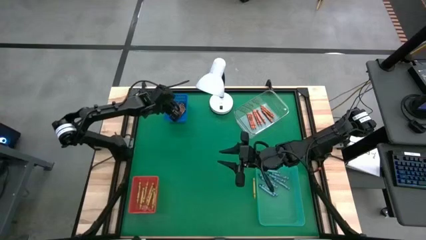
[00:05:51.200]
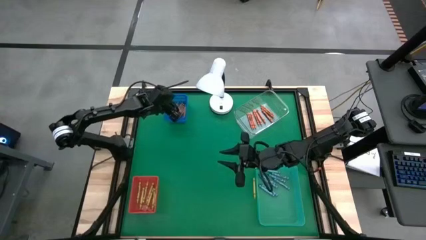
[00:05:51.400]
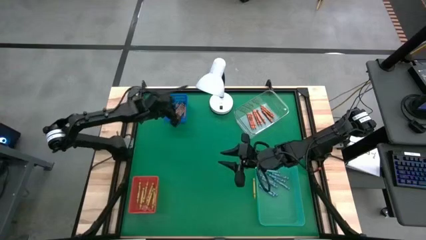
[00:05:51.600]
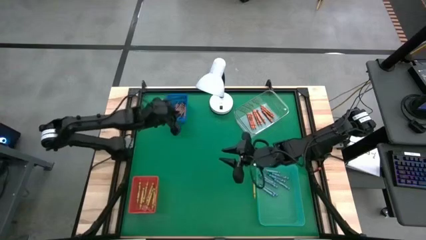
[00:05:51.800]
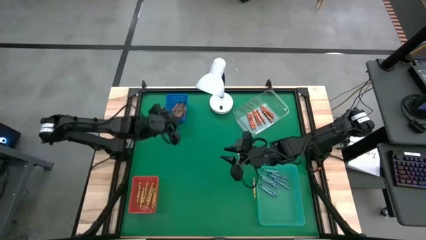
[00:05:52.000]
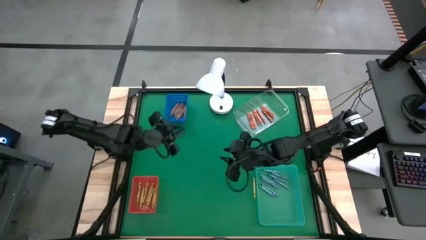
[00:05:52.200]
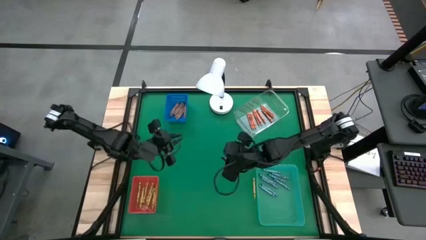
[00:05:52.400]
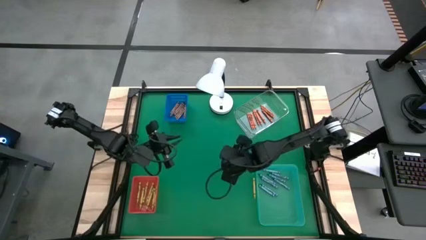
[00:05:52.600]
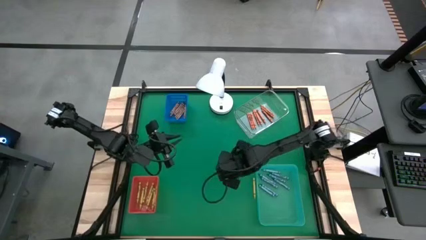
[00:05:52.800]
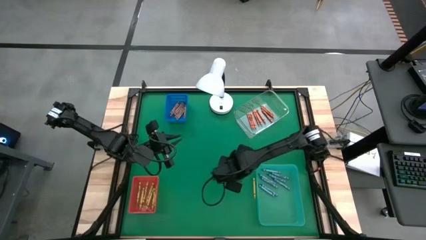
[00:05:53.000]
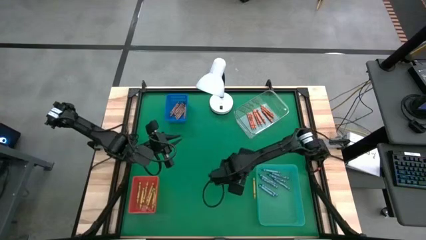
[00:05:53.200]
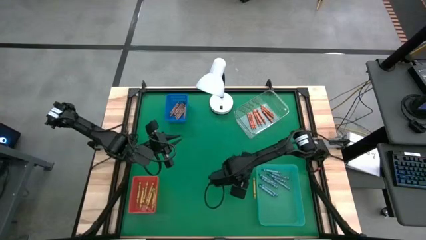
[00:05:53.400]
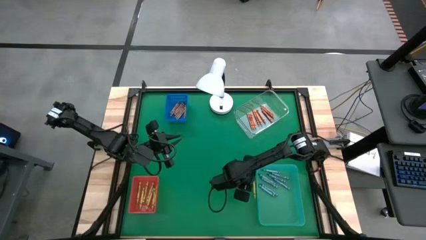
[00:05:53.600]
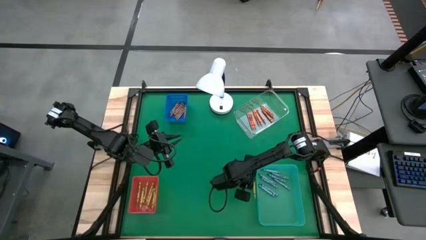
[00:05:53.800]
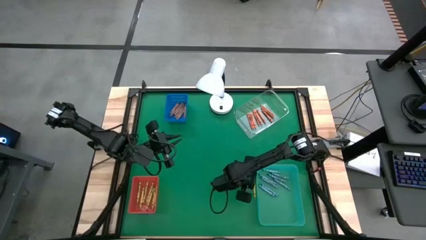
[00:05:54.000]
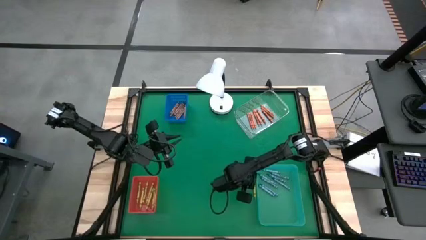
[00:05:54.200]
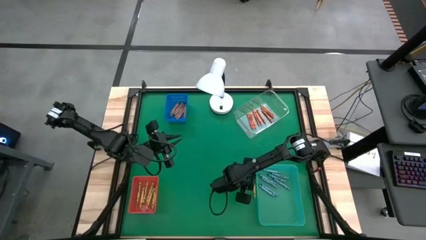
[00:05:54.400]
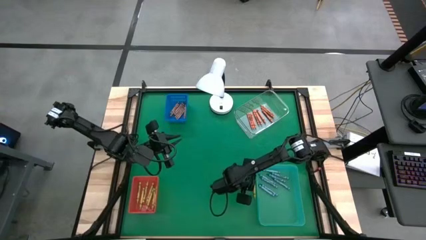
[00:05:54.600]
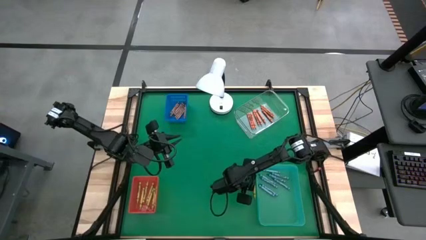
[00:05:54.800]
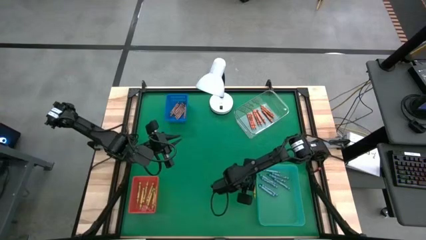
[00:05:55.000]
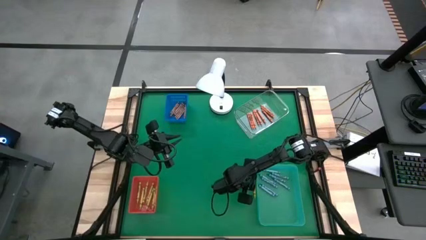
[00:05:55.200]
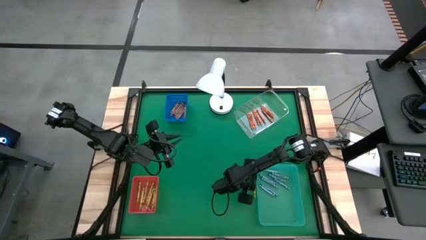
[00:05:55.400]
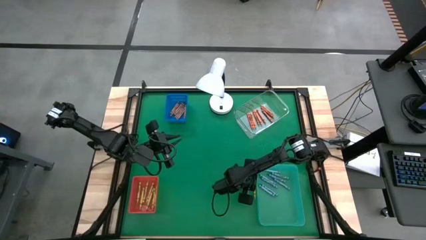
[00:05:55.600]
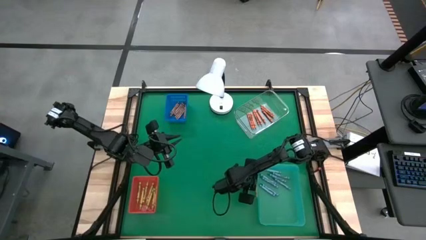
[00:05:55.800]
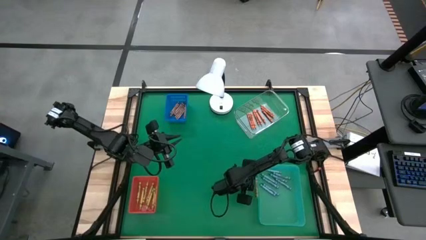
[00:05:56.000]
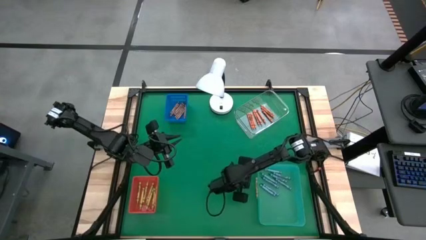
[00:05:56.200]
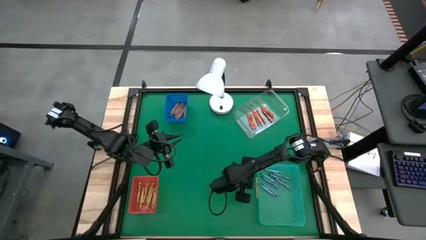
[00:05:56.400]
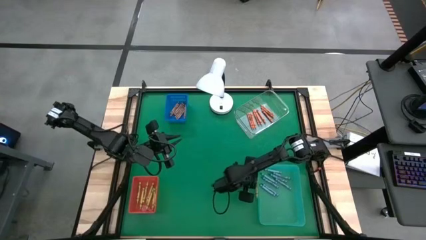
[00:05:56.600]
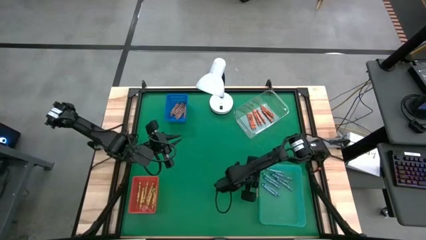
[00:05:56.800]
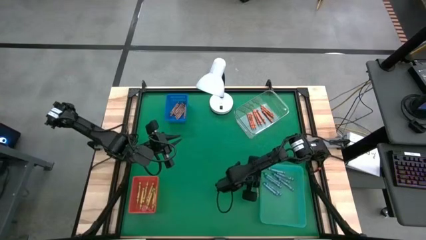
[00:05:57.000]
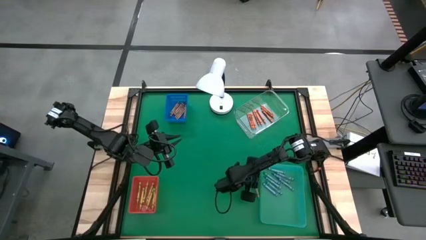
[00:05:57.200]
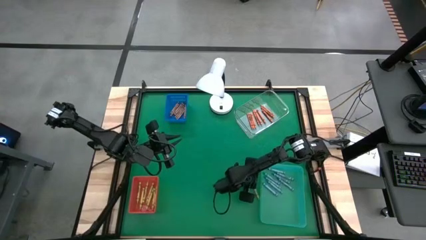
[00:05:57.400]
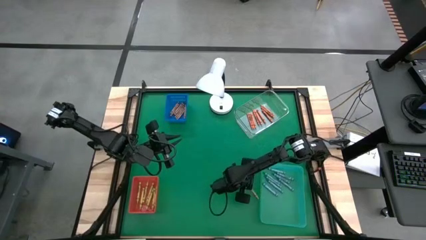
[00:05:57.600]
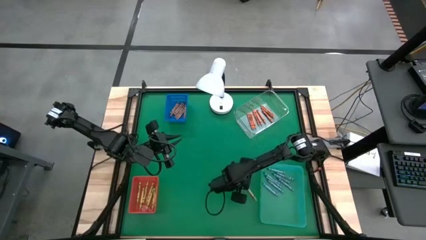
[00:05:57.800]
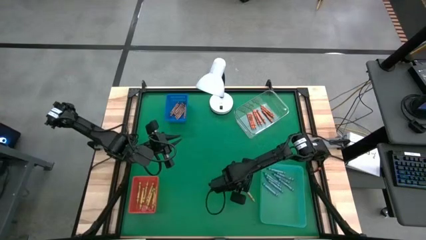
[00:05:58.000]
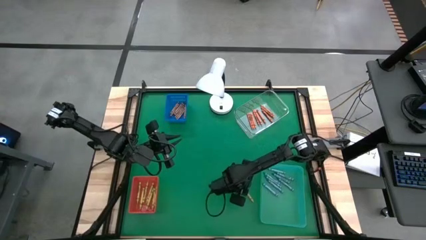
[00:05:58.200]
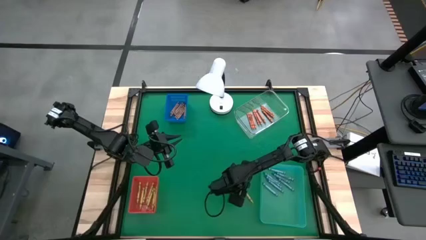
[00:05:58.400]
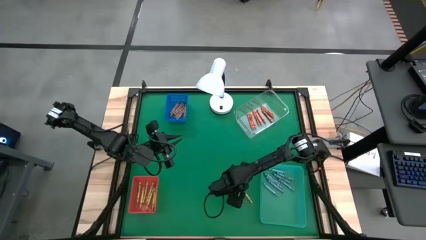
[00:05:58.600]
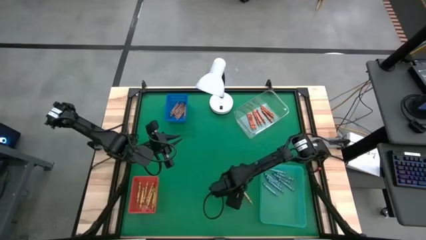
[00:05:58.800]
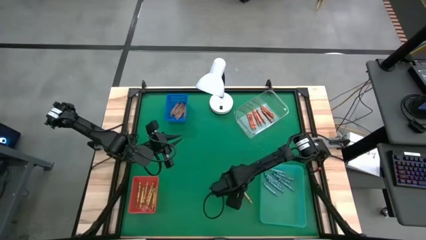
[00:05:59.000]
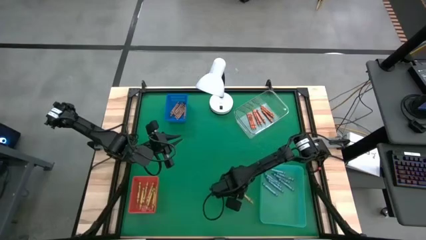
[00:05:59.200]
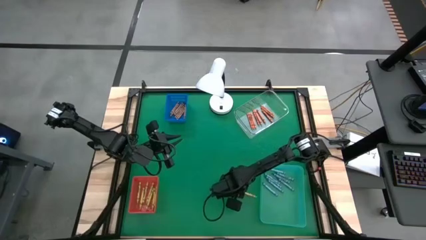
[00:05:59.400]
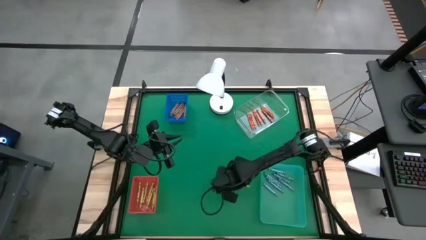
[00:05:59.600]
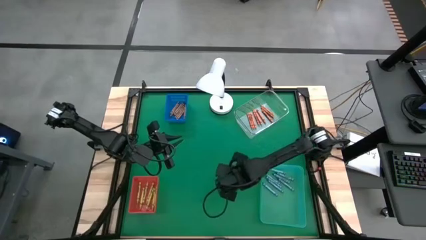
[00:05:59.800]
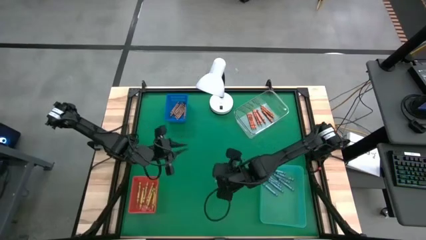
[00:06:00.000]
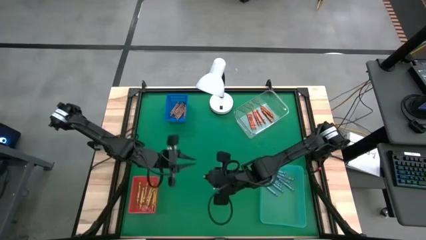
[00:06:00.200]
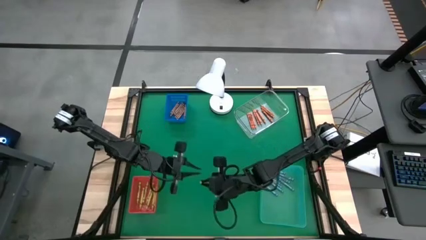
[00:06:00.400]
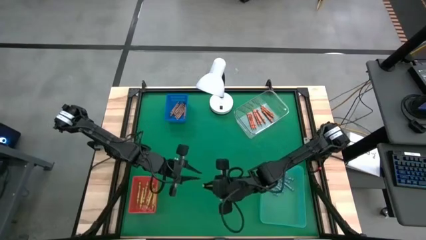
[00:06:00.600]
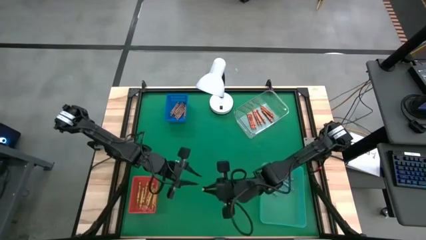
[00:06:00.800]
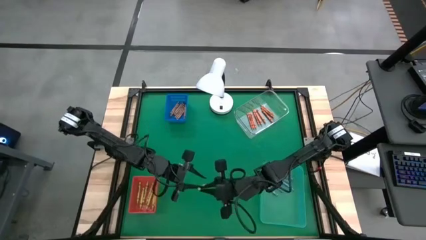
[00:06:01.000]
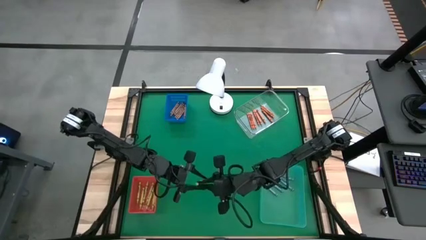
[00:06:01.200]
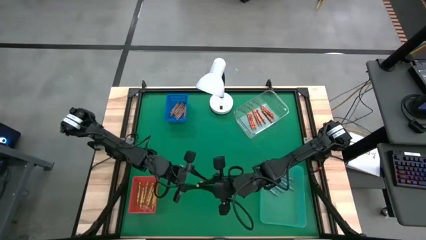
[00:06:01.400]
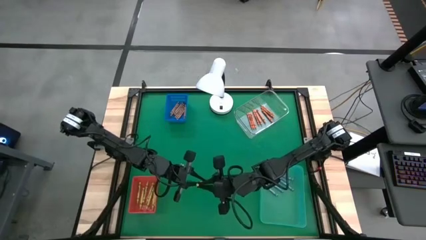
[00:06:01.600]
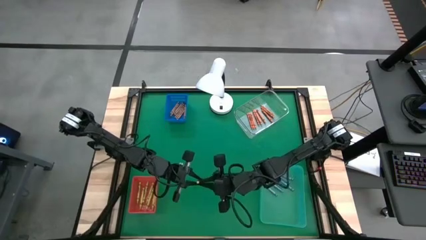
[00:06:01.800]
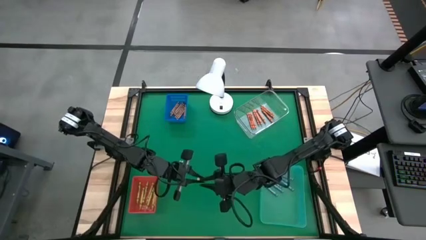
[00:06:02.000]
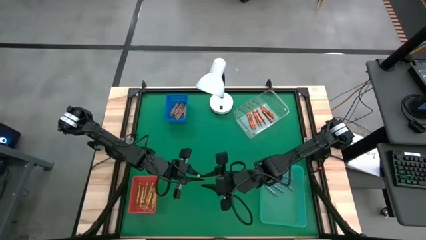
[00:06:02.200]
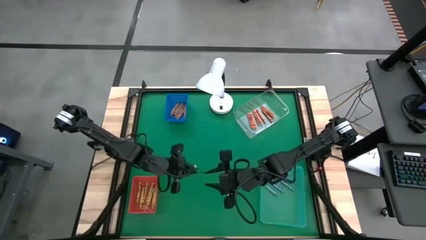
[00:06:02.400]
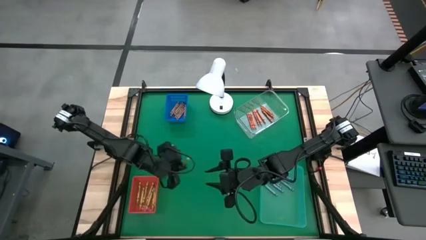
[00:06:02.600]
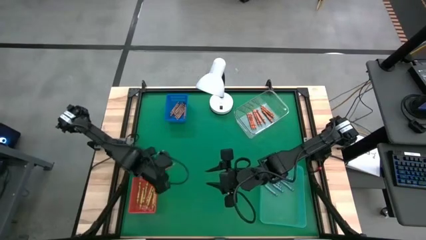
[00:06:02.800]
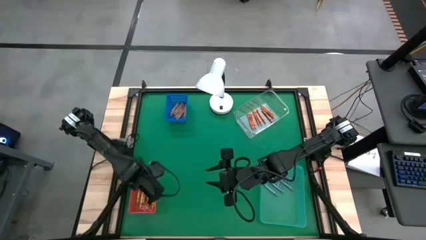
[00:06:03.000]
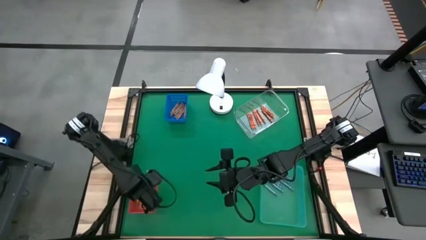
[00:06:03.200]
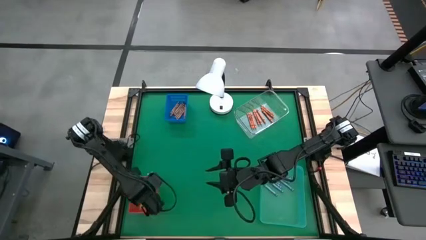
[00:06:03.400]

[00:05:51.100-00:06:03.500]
Task: Sort crayons
Put the yellow crayon into the red bin
